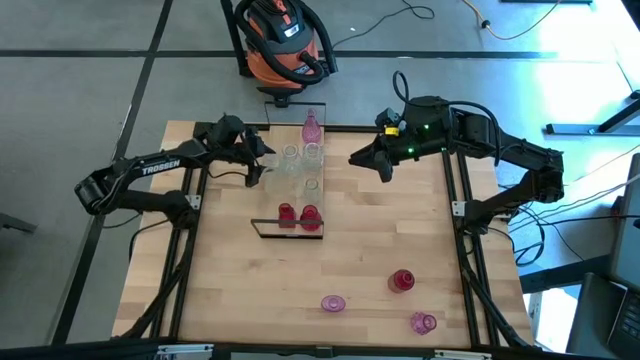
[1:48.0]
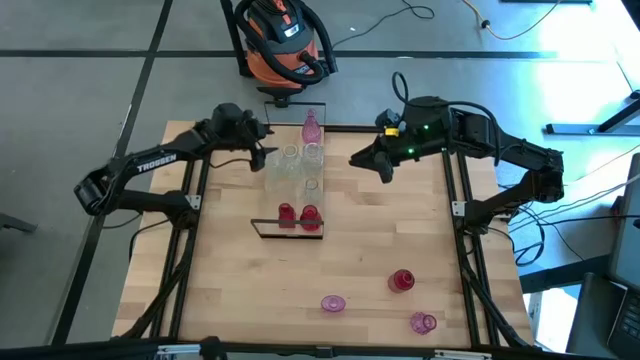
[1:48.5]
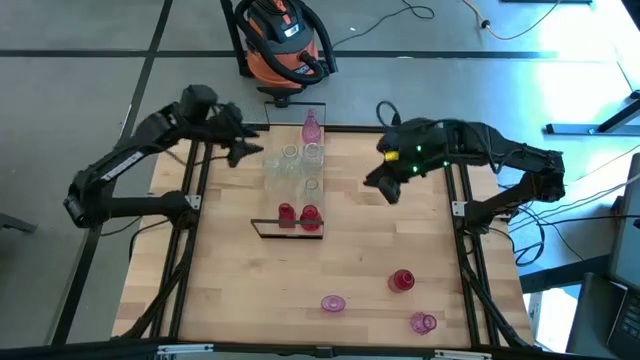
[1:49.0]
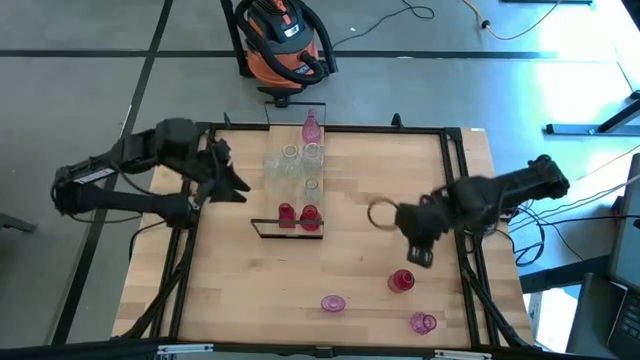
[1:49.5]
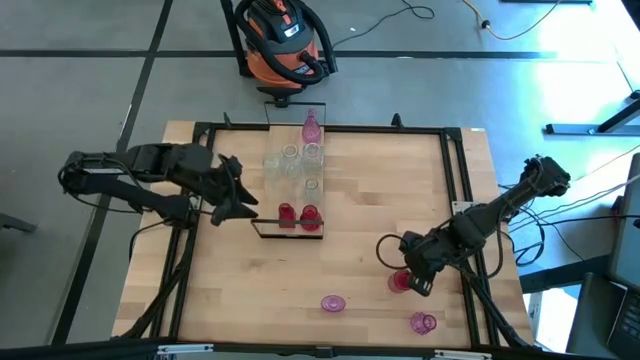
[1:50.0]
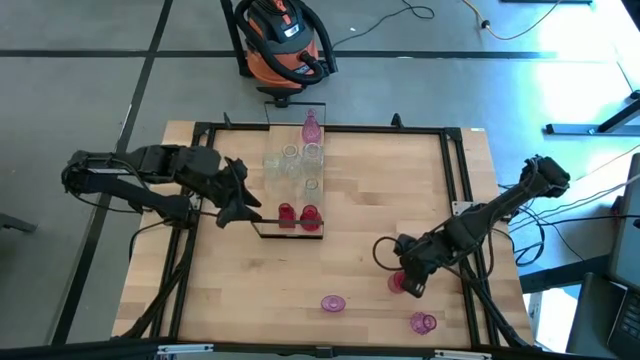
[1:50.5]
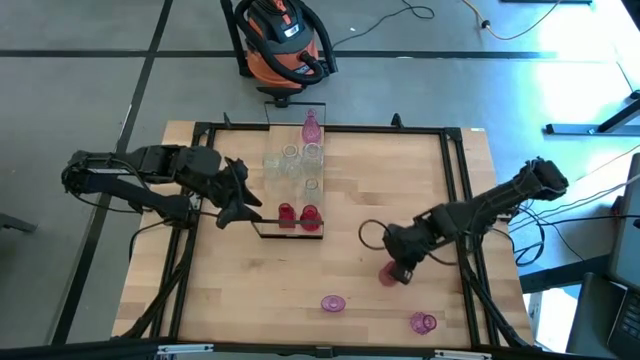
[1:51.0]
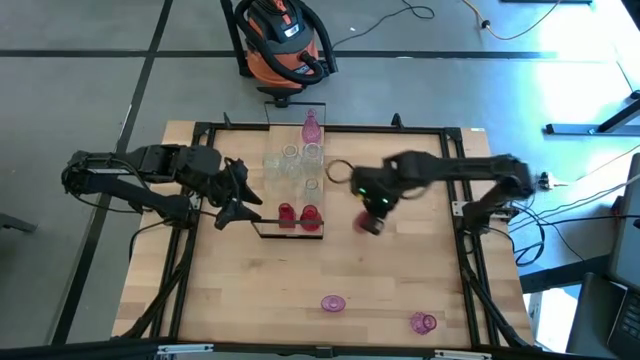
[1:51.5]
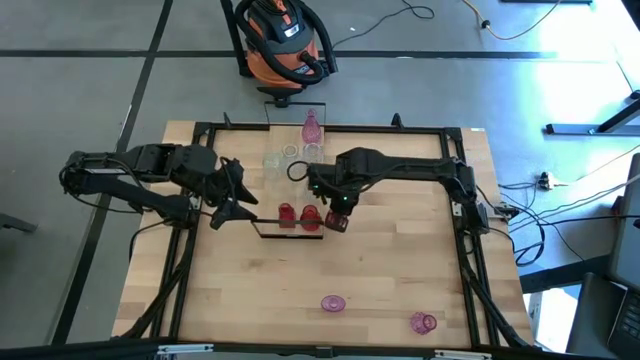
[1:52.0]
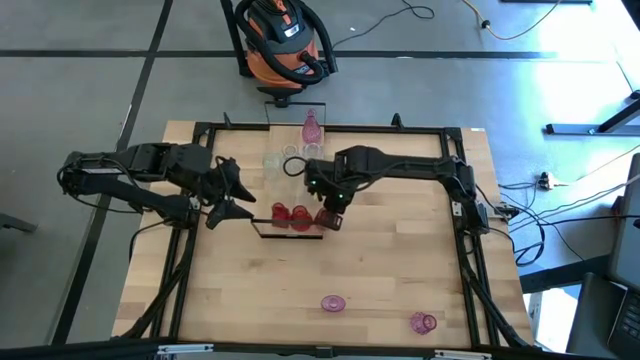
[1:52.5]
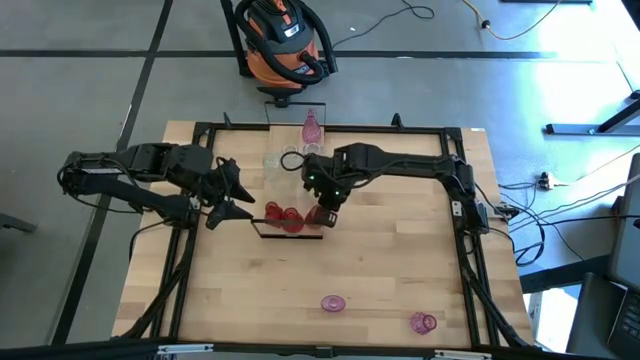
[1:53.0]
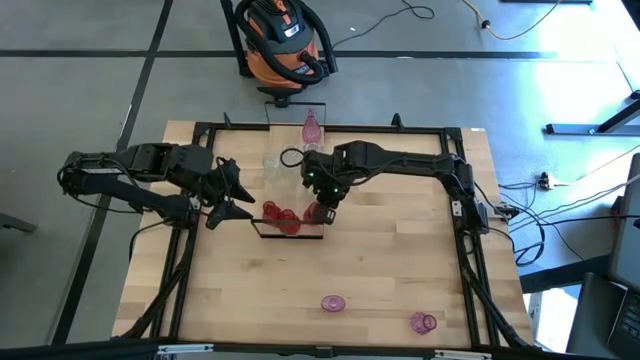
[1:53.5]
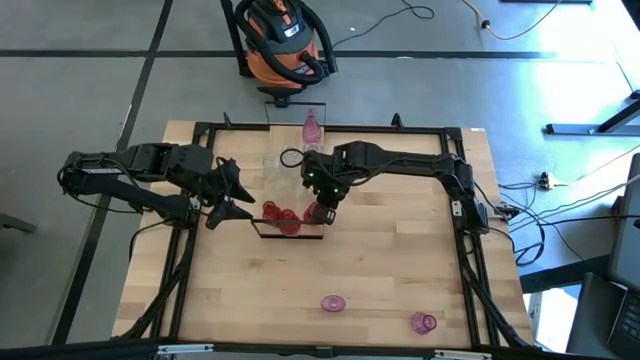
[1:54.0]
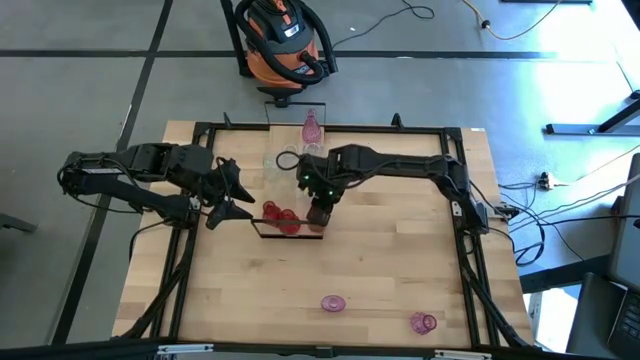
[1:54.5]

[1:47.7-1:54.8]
Task: sort vases onto shelf
Put the red vase on the shelf

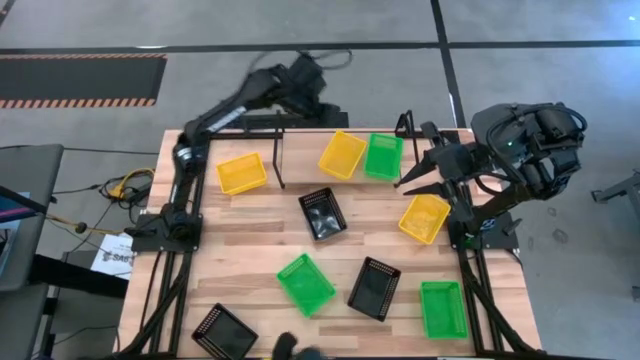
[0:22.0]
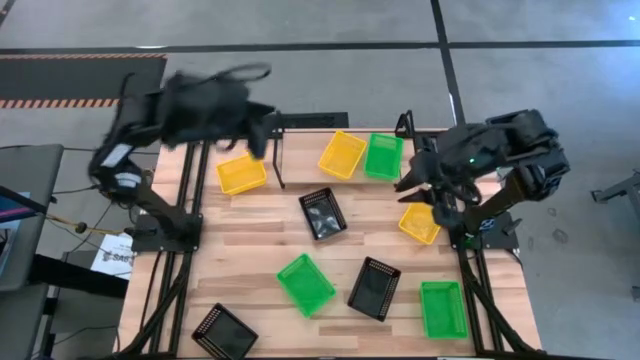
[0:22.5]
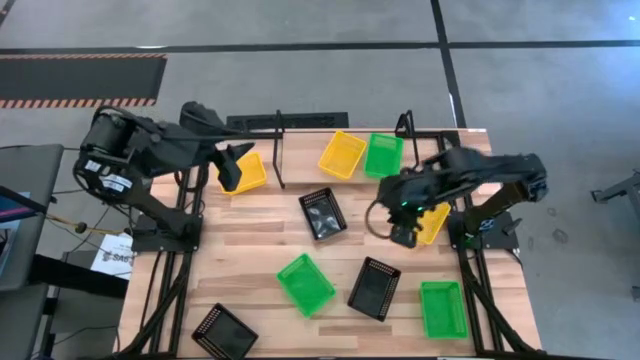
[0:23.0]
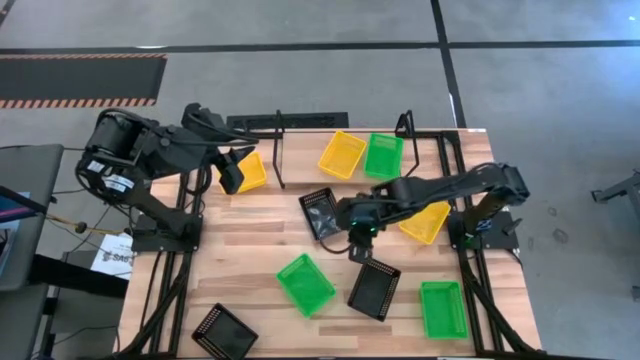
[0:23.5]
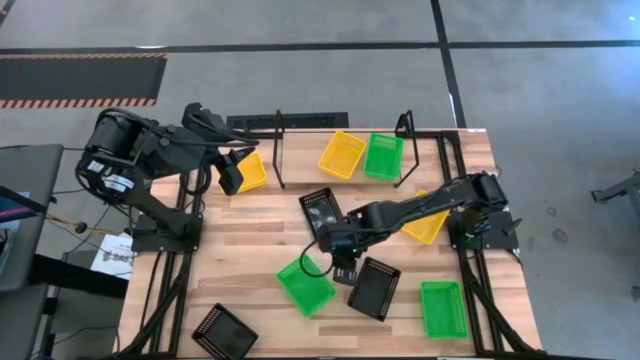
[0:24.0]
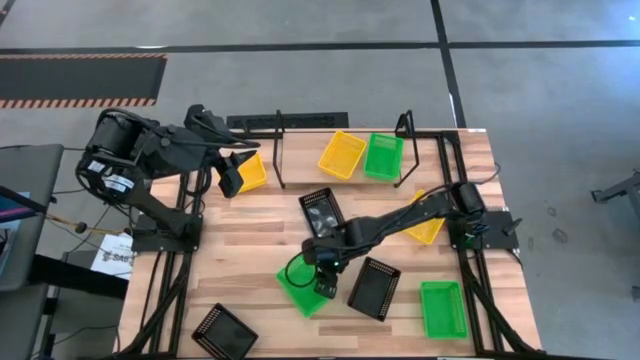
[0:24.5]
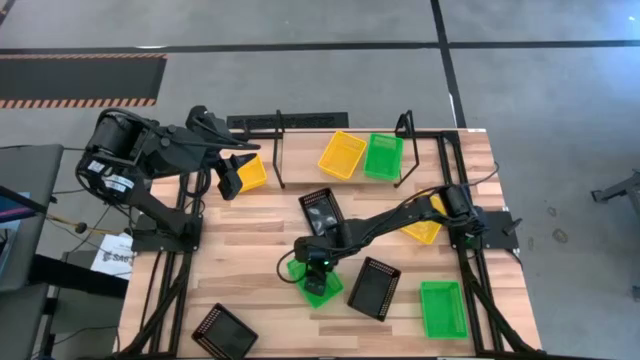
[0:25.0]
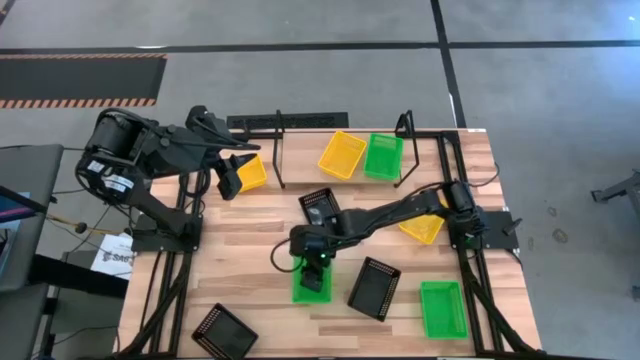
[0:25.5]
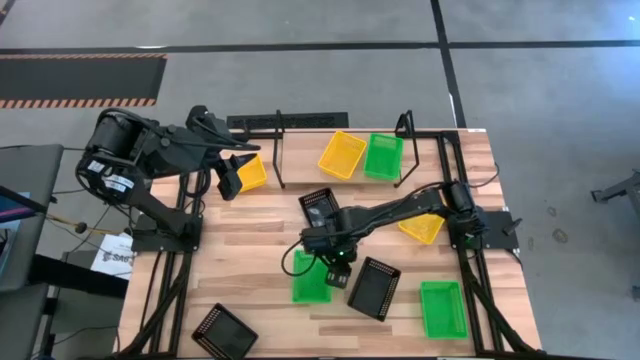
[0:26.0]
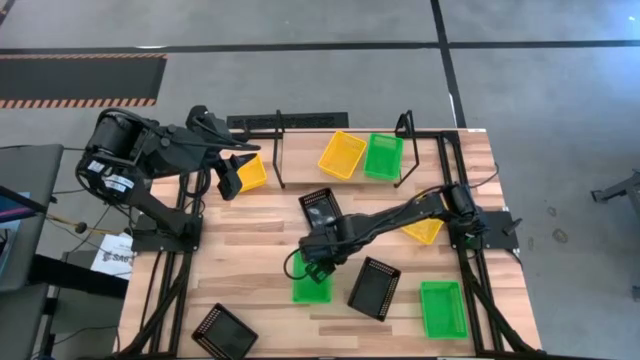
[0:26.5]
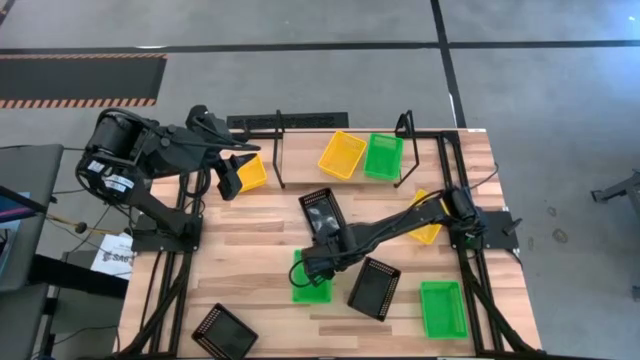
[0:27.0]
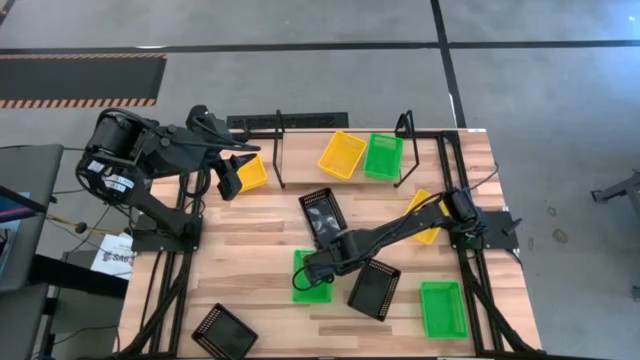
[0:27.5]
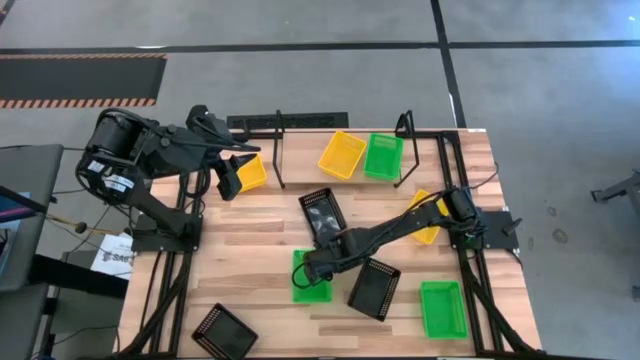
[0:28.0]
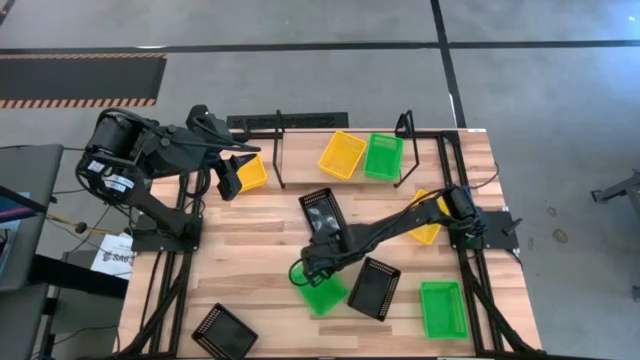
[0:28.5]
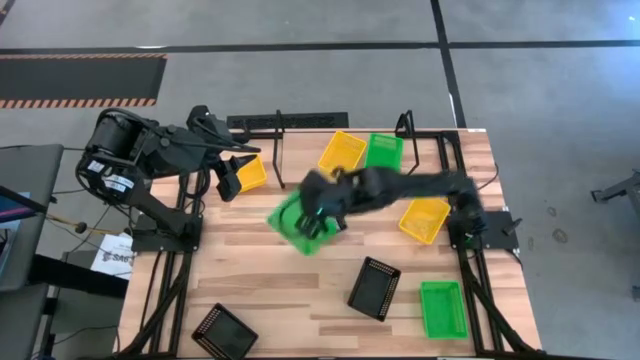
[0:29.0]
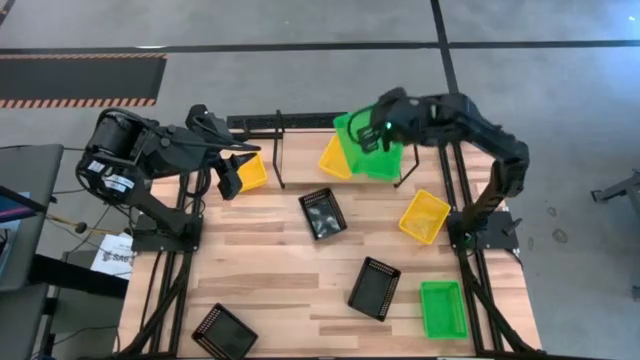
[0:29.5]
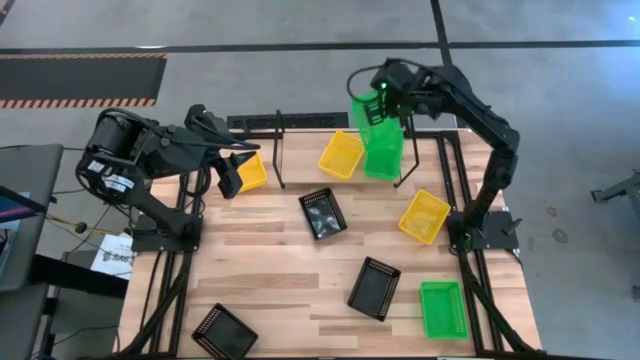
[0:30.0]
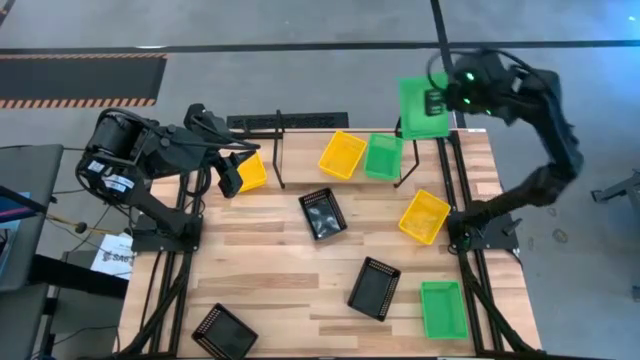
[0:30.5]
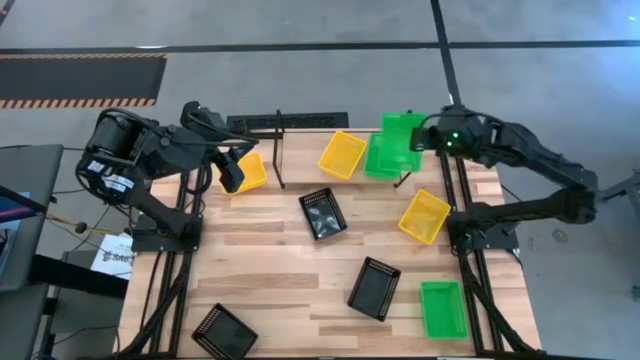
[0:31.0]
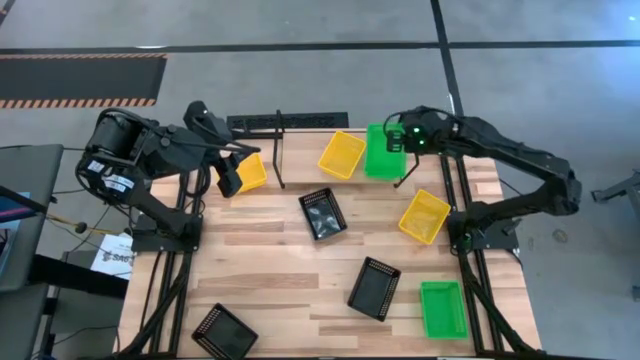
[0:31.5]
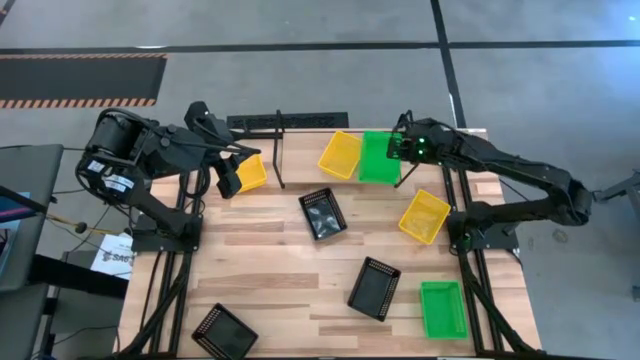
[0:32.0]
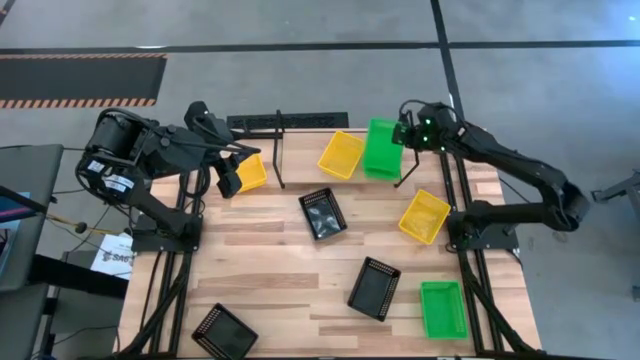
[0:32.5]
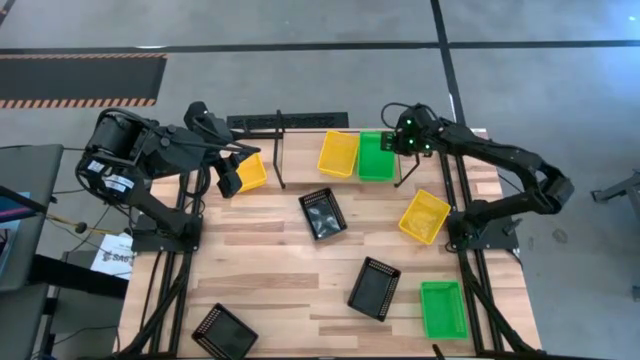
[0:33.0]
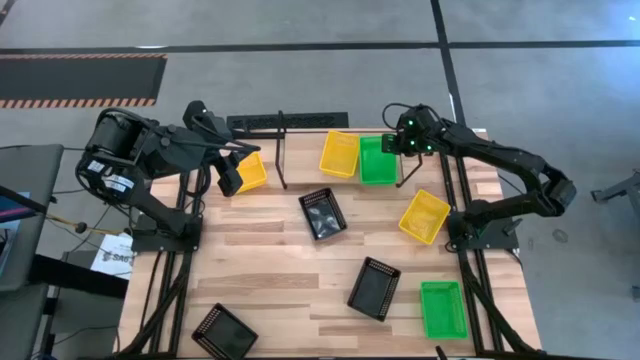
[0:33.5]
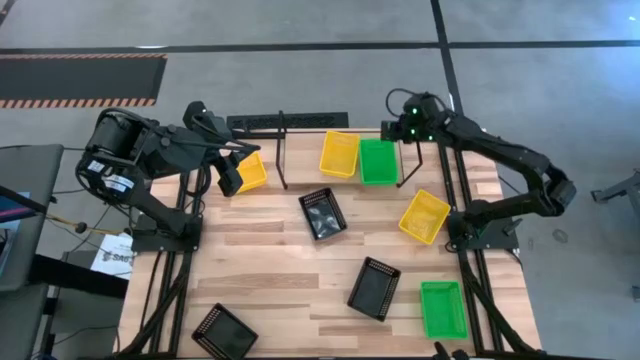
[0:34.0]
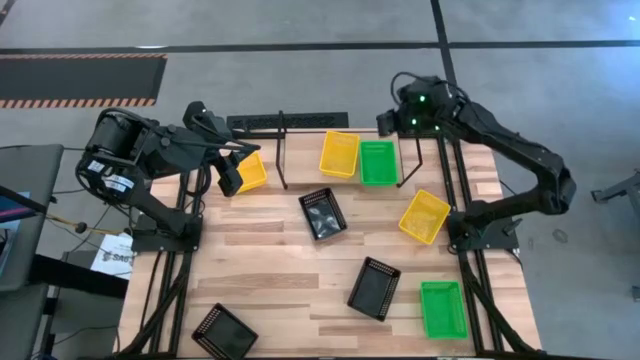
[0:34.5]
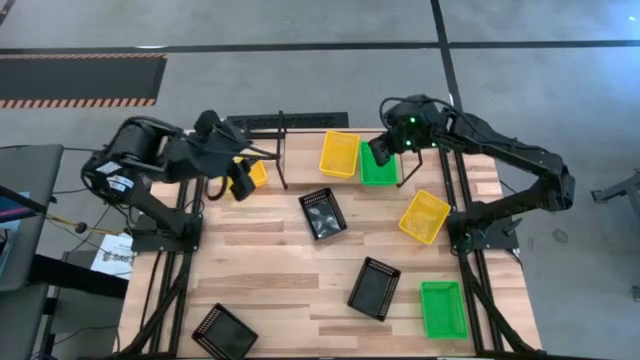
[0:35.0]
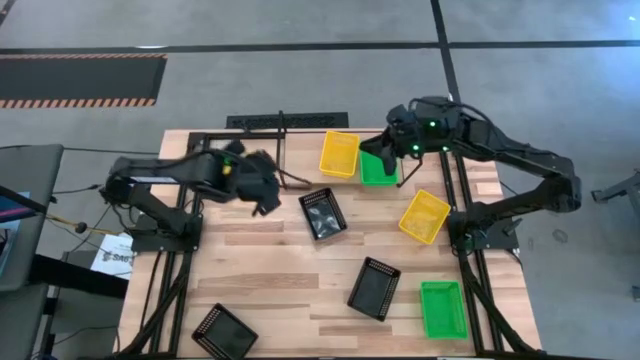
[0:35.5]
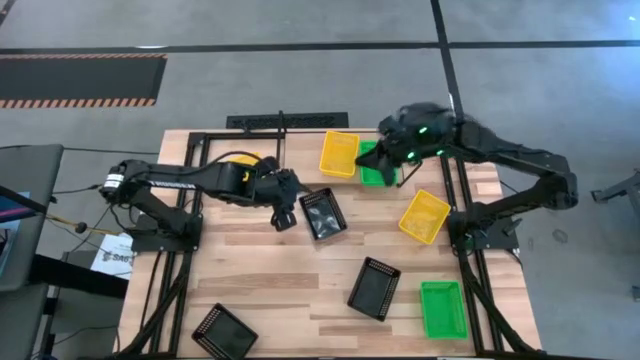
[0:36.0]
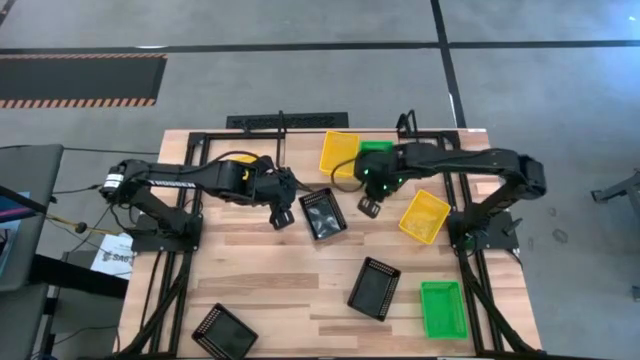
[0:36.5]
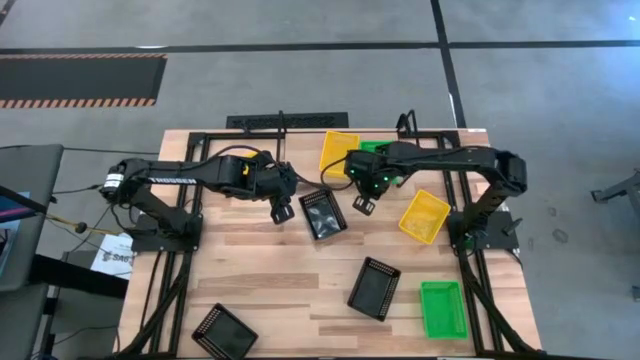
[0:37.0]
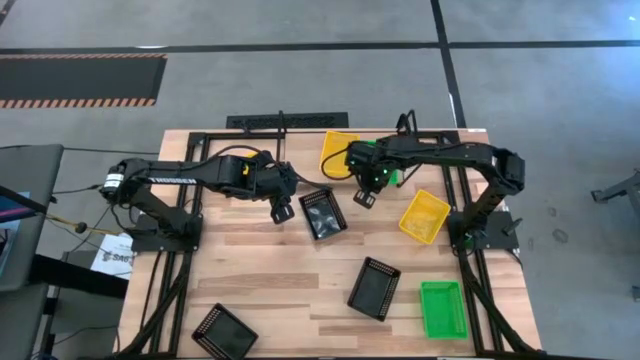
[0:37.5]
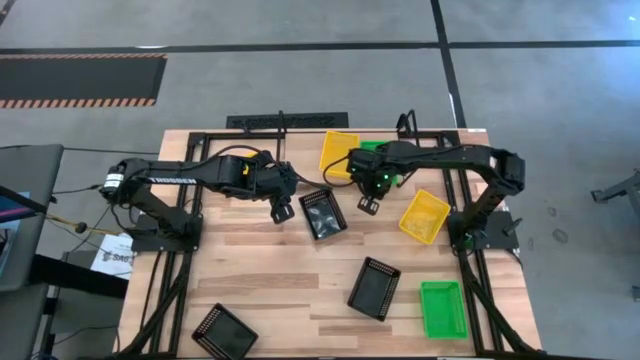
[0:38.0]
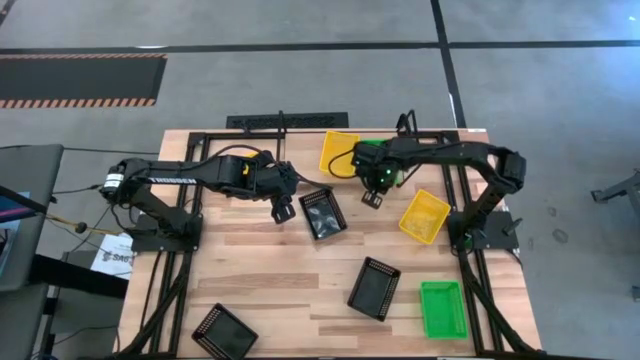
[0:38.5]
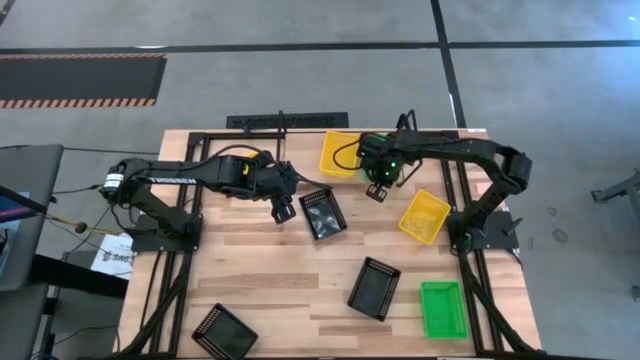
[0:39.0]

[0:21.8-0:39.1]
Task: Stack baskets on shelf by color
Stack the left green bin on top of the green bin on the shelf
